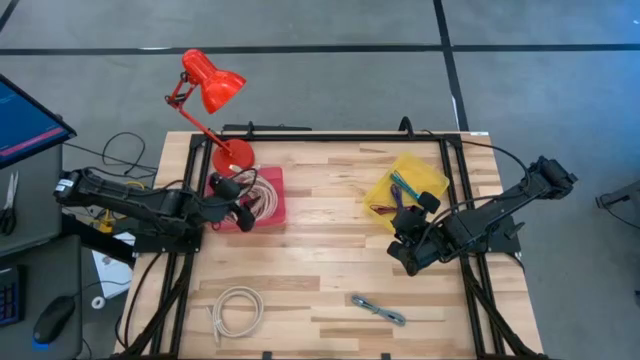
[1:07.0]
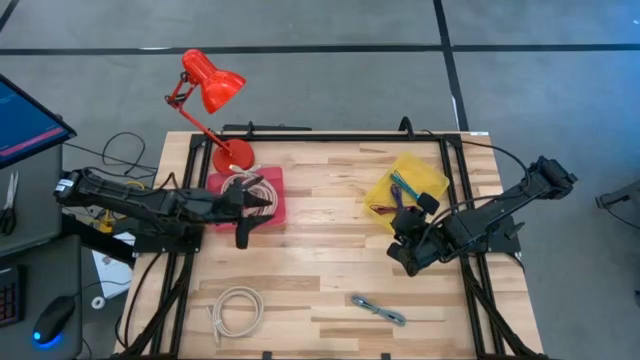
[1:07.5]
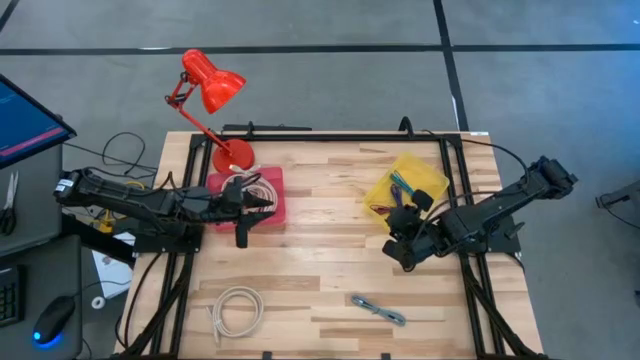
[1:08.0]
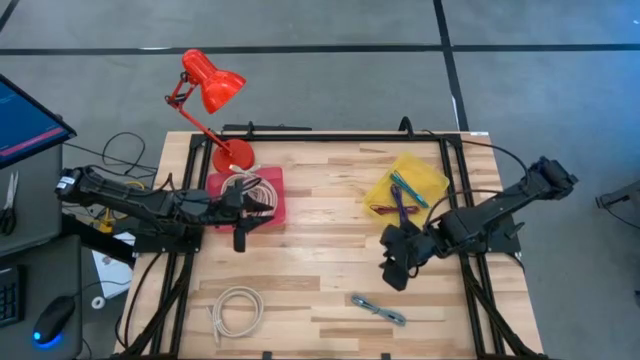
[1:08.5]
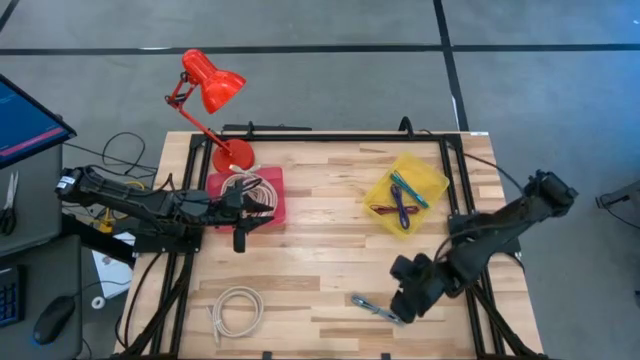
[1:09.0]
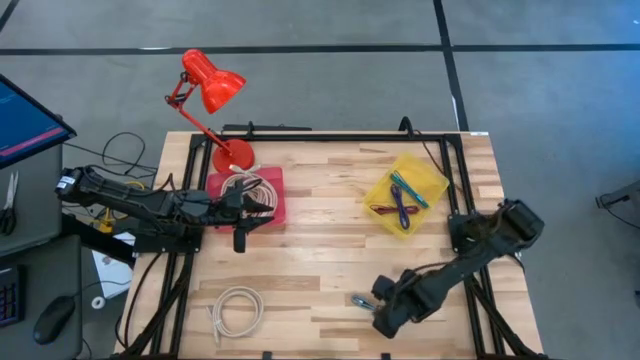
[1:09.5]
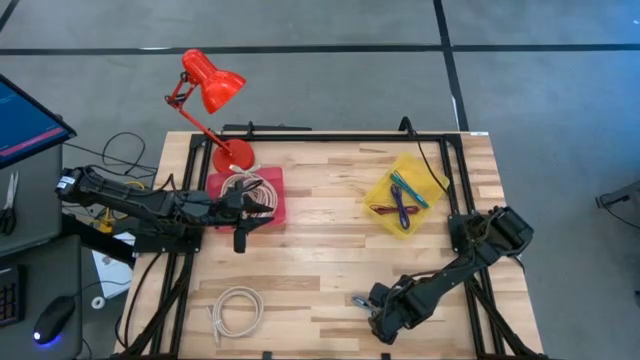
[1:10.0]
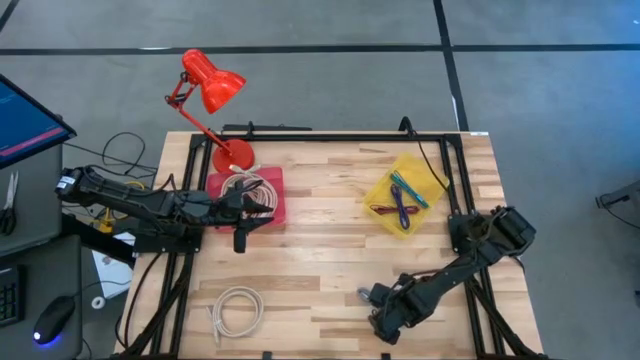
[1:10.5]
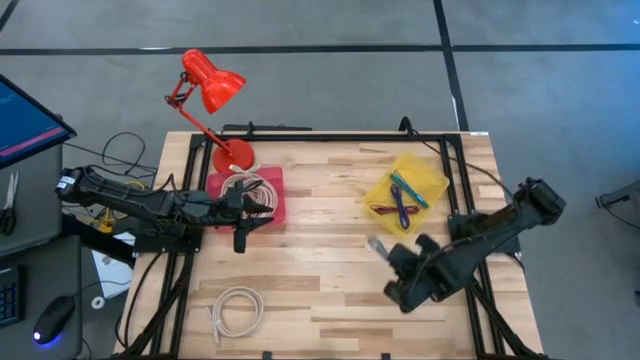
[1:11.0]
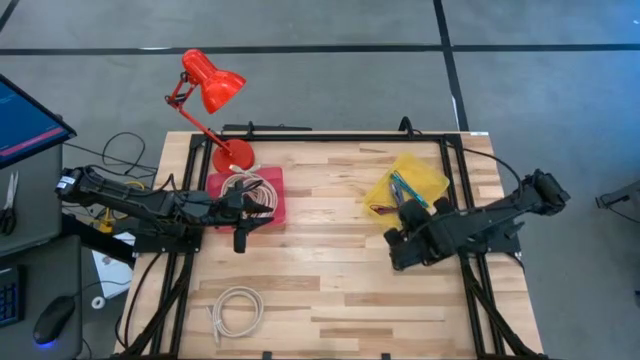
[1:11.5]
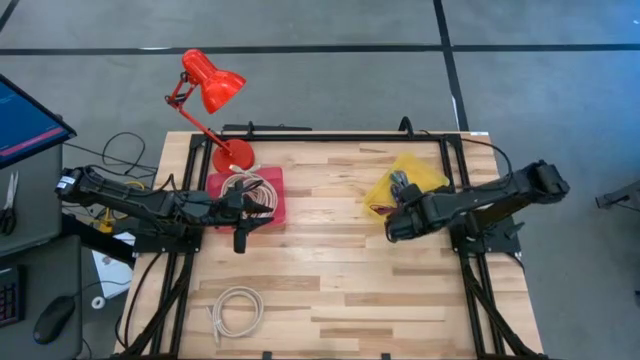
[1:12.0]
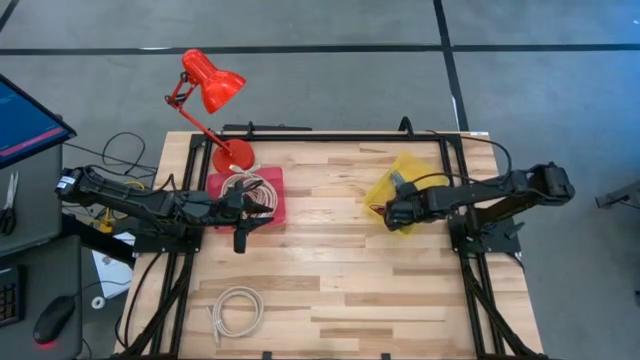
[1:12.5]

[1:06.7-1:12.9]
Task: Pick & Place USB Port
Put the white USB cable into the yellow bin

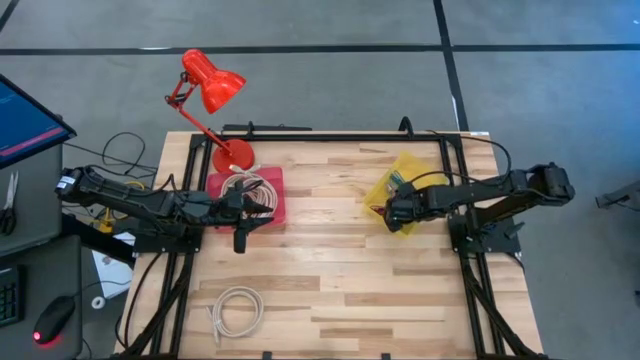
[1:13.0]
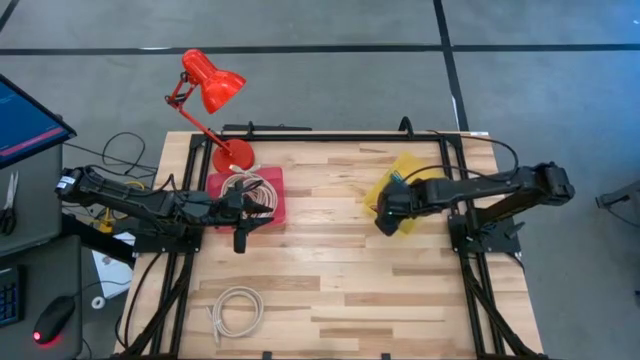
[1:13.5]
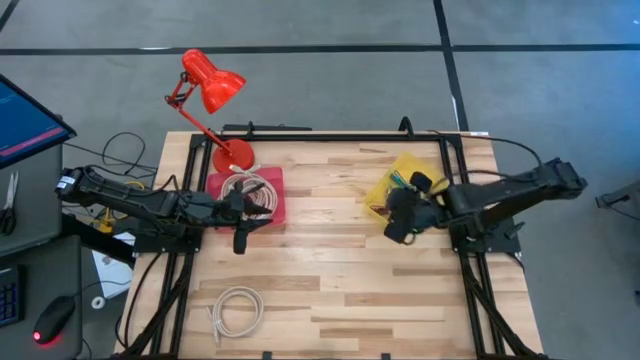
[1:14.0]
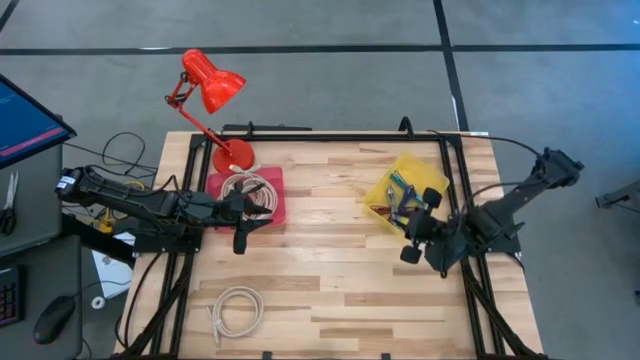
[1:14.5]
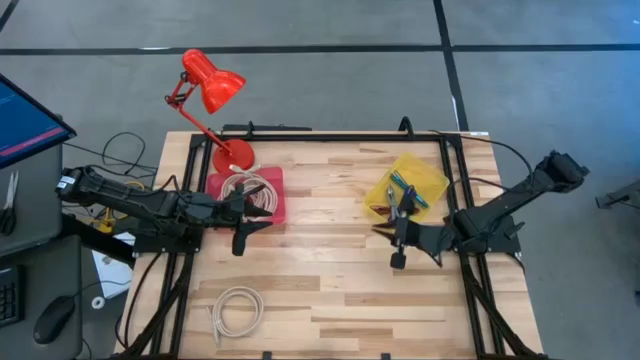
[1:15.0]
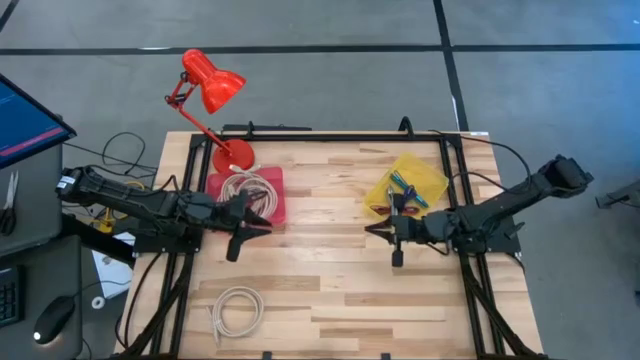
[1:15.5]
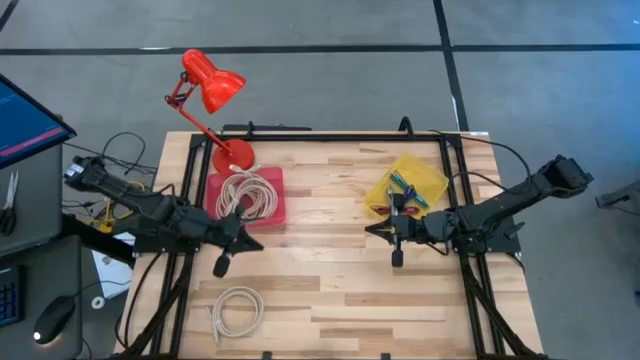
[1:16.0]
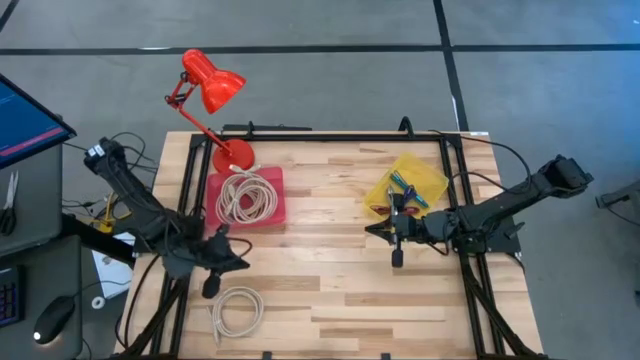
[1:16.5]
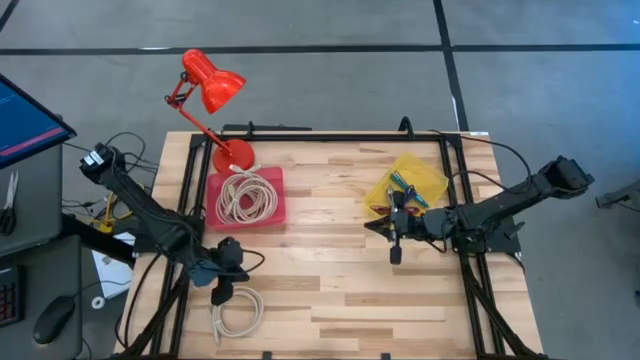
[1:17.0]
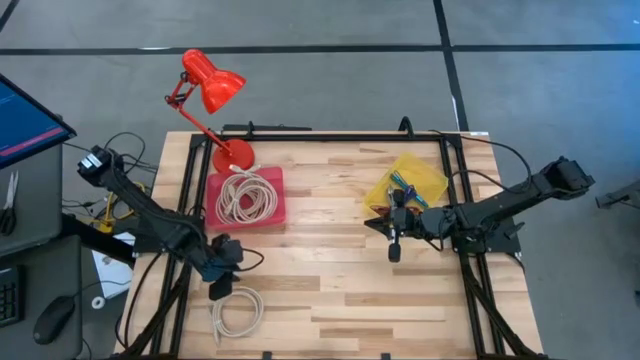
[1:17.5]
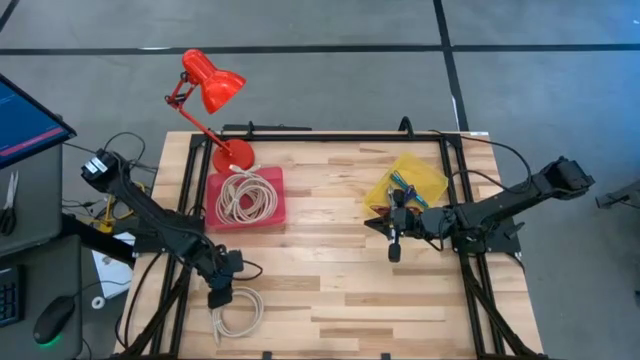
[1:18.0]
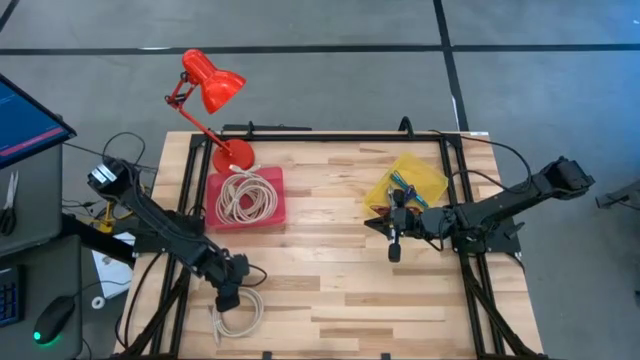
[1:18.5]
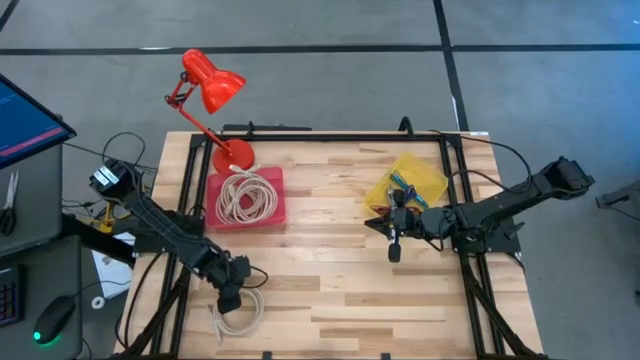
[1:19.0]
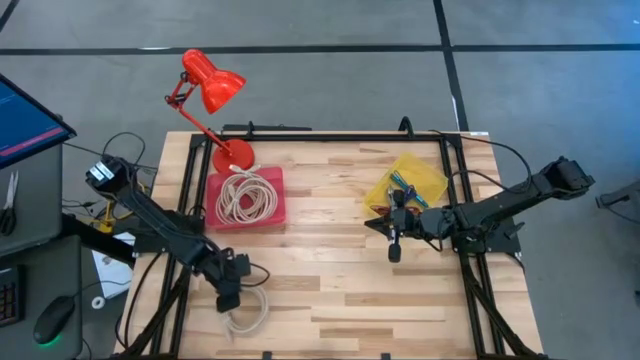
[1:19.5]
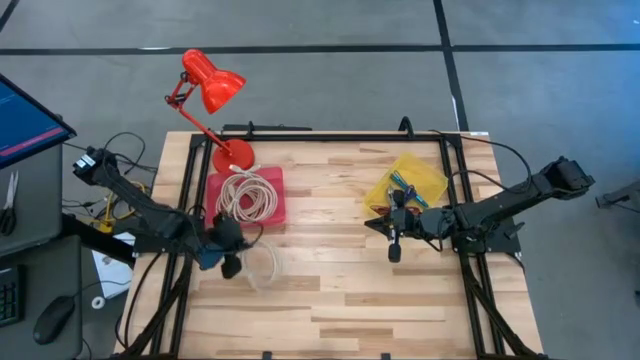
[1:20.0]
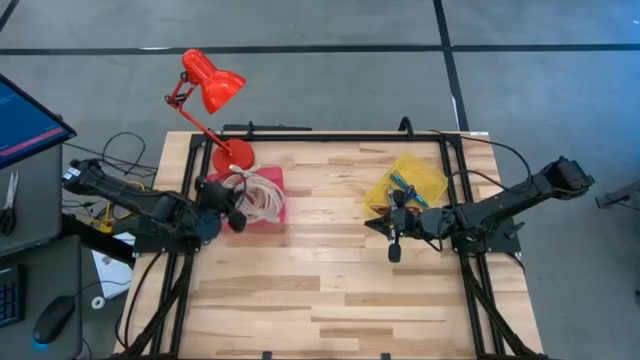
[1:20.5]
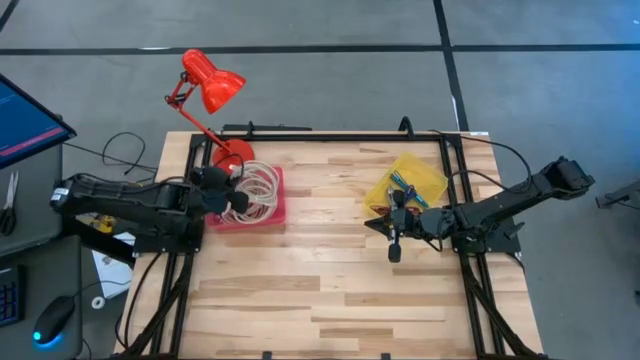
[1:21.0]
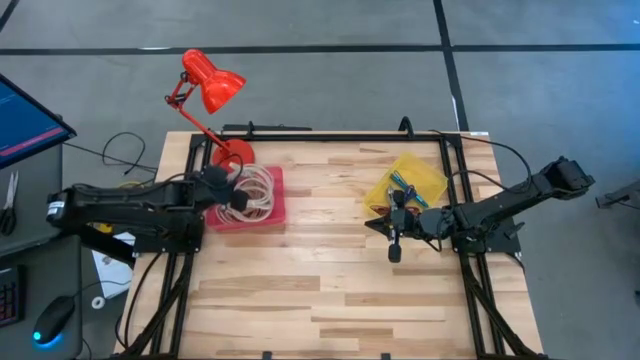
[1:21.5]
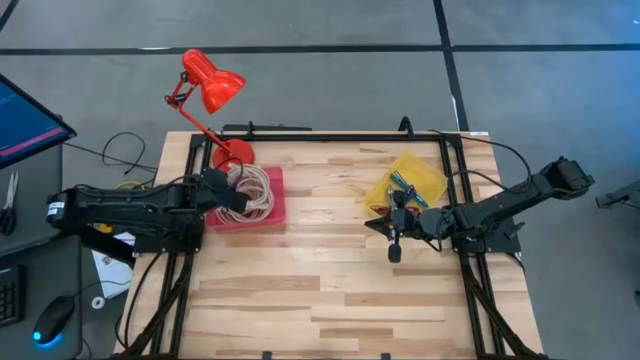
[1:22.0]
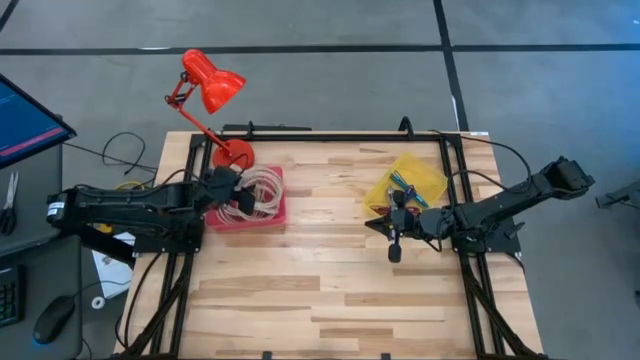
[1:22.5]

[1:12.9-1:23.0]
Put the brown USB cable into the pink bin

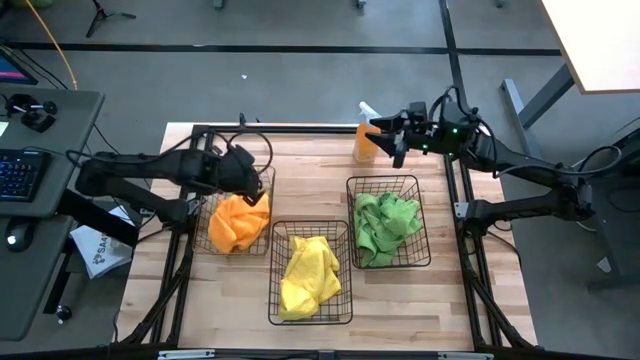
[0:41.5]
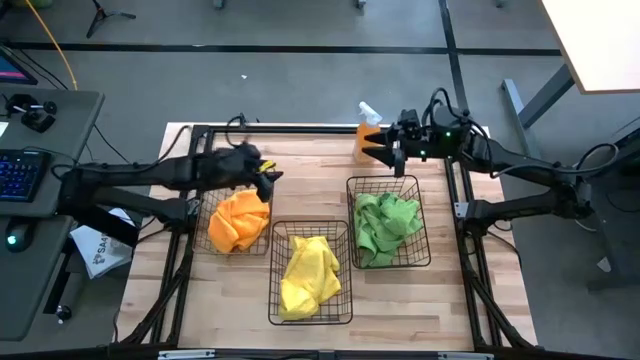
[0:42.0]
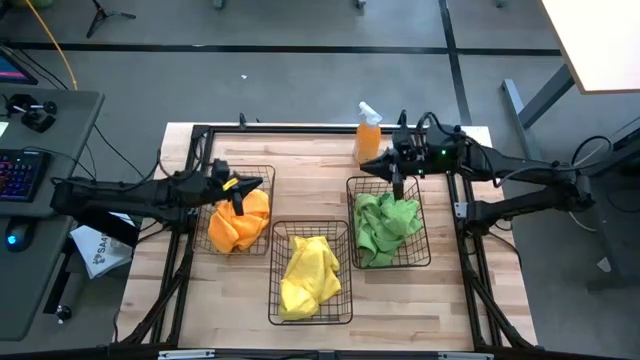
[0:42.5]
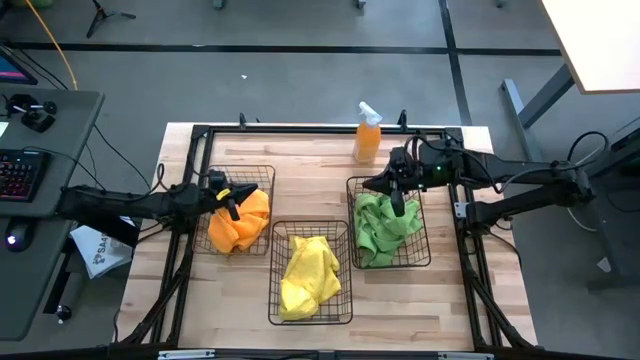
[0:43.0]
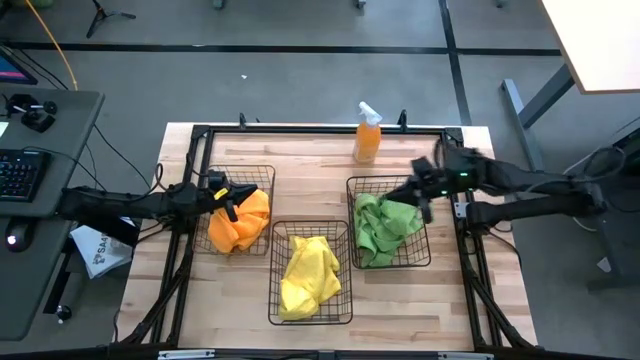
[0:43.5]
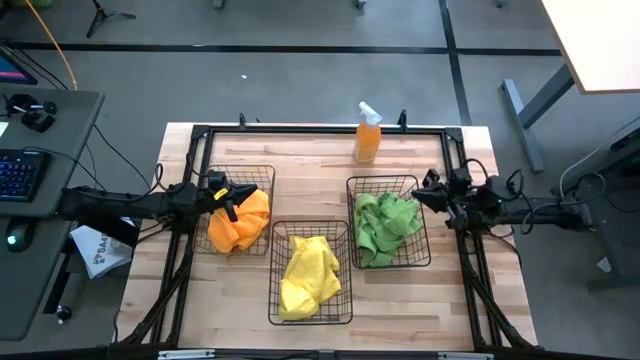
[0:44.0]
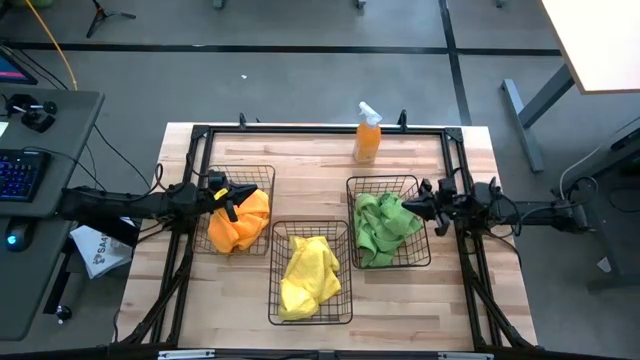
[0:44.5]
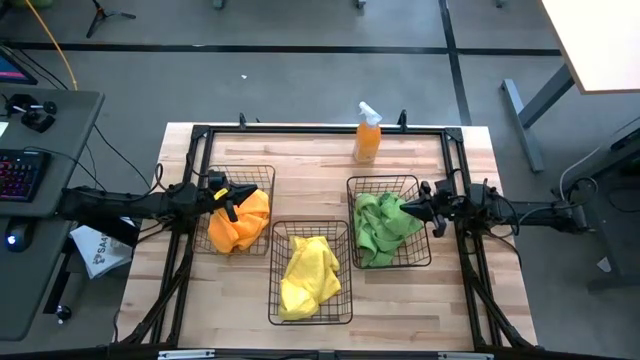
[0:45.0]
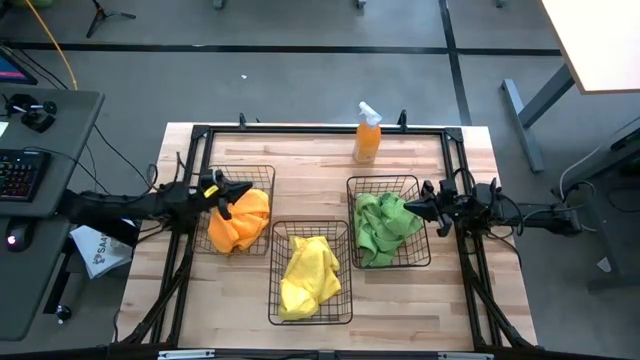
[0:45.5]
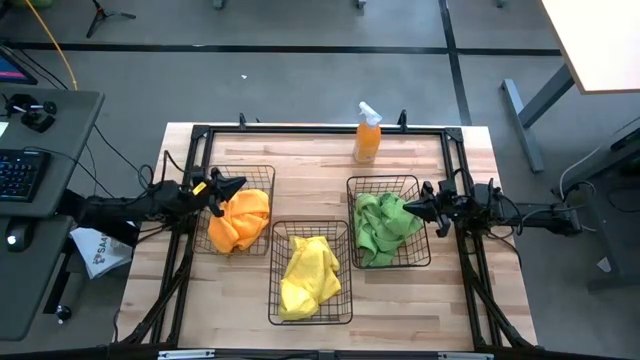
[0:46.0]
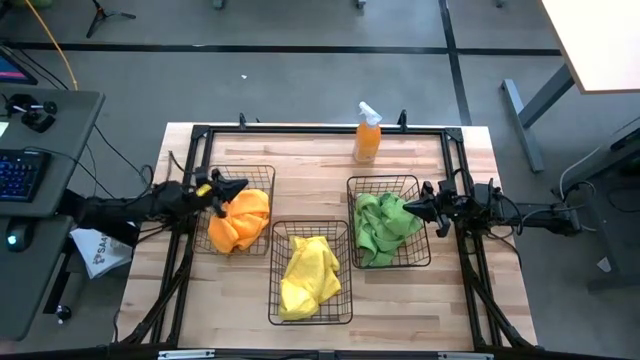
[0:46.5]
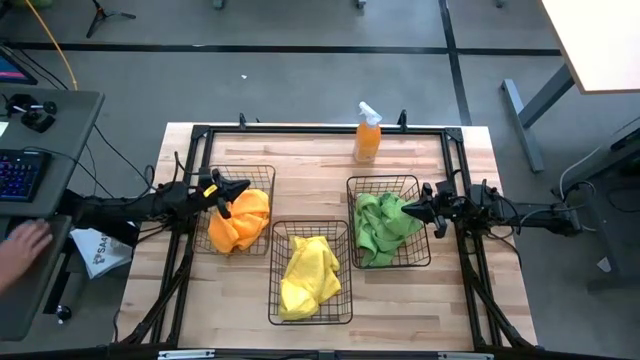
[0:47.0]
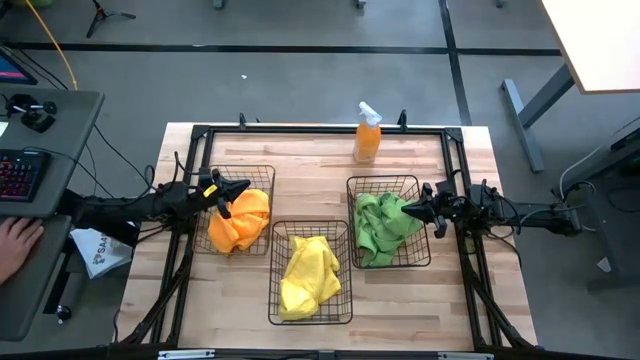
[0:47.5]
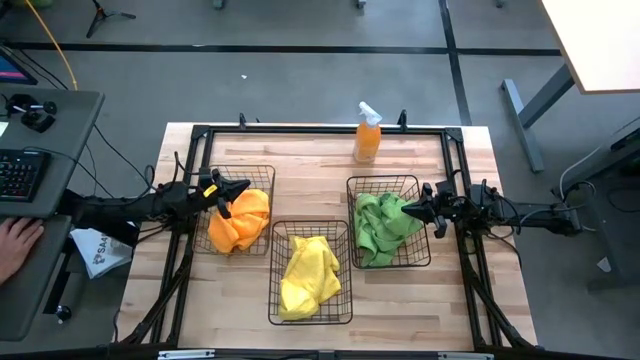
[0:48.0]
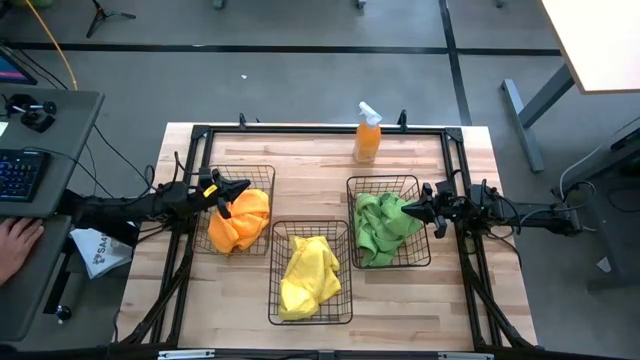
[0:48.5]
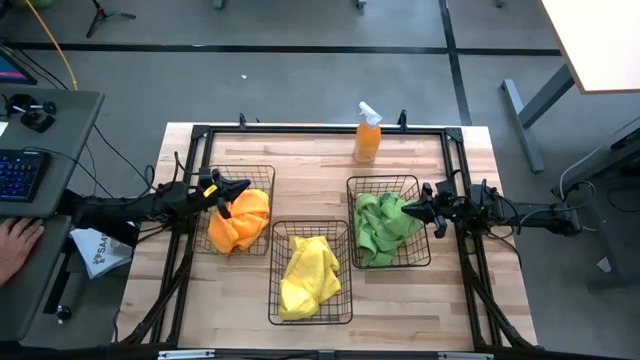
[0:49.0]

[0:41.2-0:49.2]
Task: Sort microfiber towel by color & place in baskets
Return to Home Position
